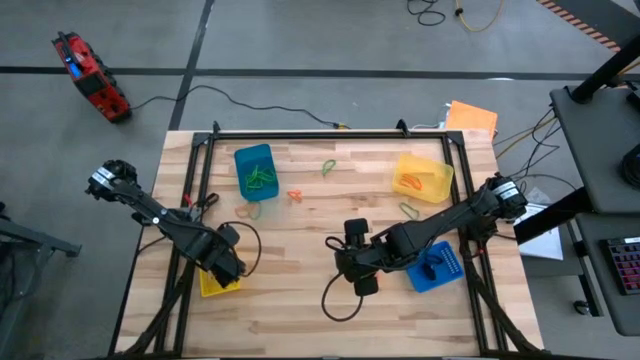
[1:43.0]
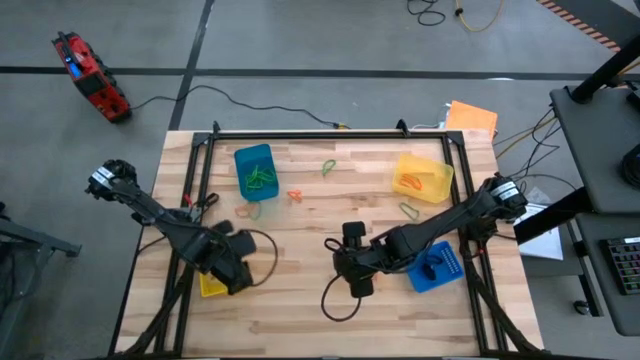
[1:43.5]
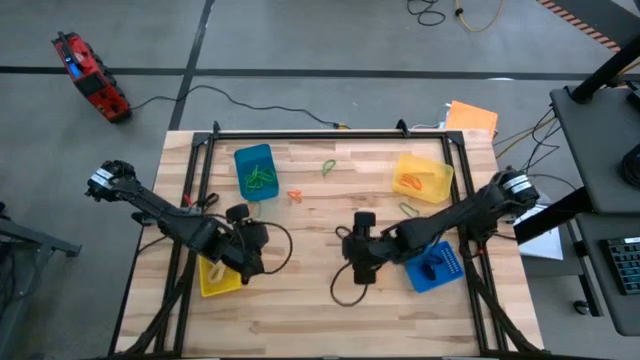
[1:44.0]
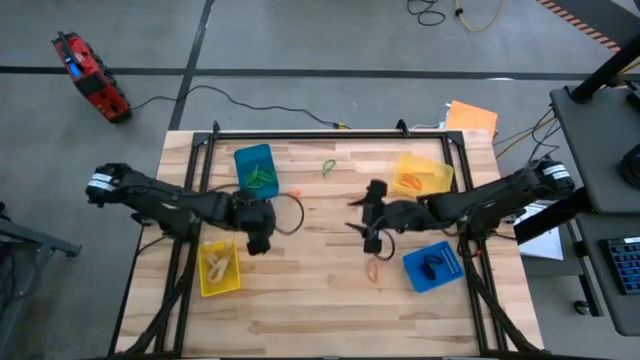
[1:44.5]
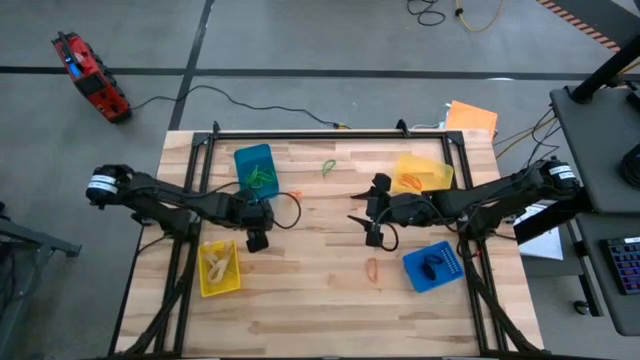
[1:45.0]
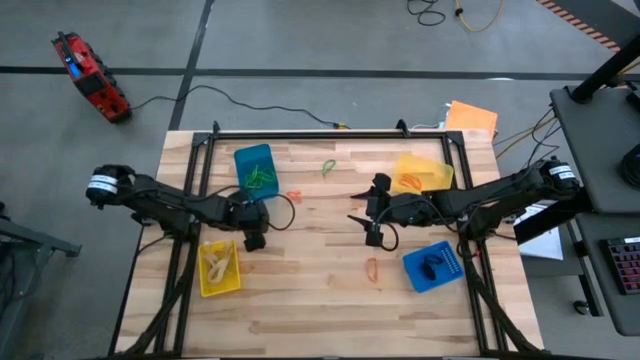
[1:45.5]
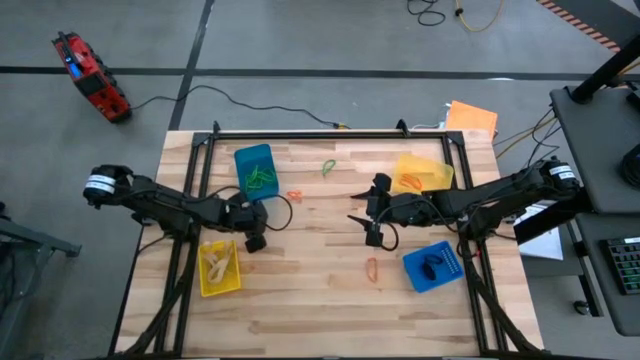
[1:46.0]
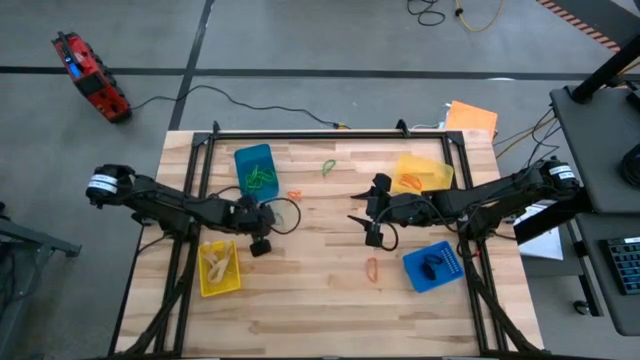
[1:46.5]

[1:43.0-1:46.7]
Task: Sort rubber bands into baskets
Put the green rubber band into the light blue bin

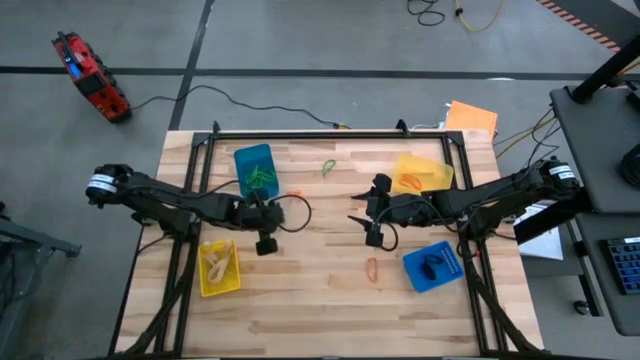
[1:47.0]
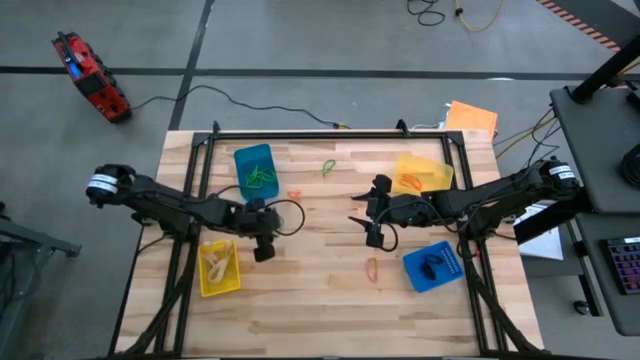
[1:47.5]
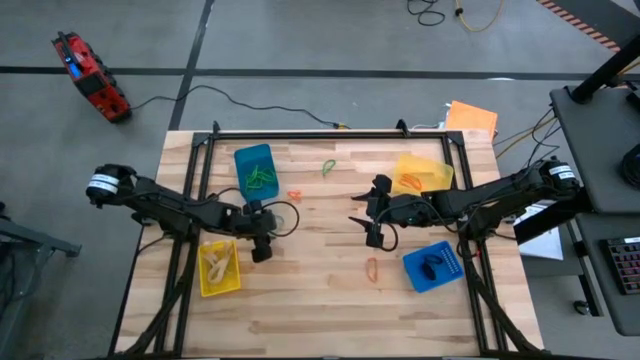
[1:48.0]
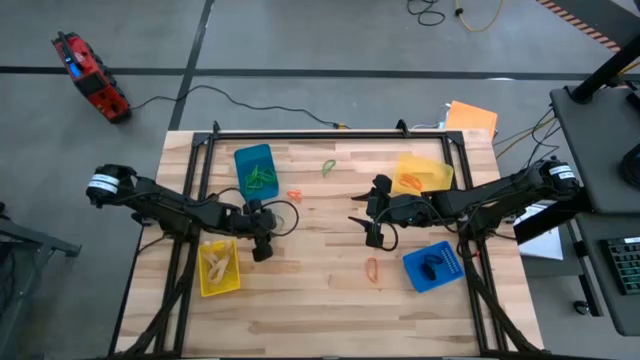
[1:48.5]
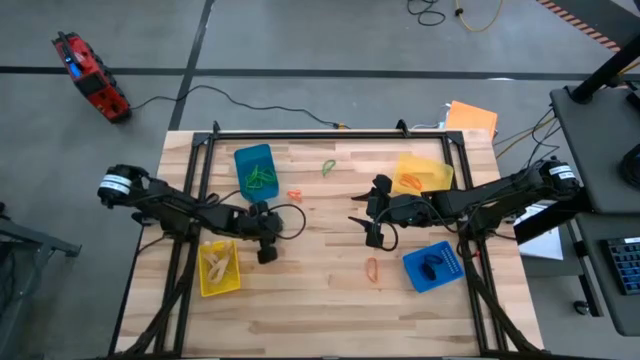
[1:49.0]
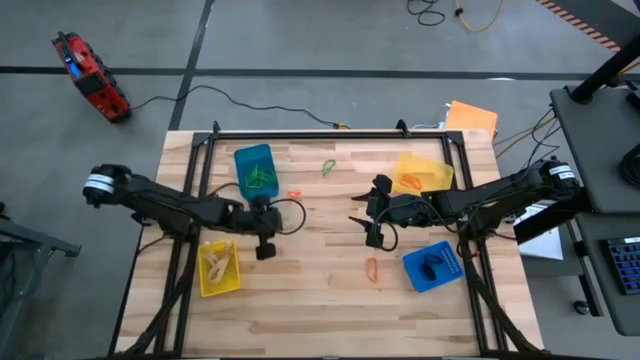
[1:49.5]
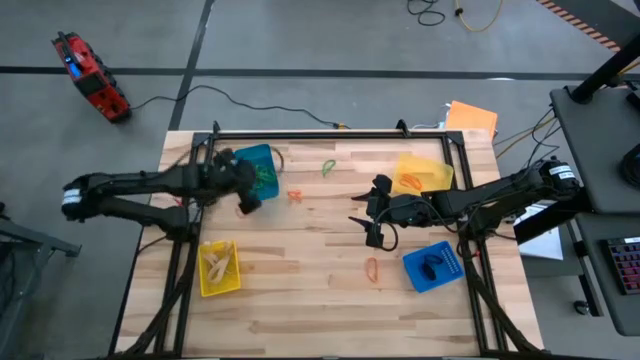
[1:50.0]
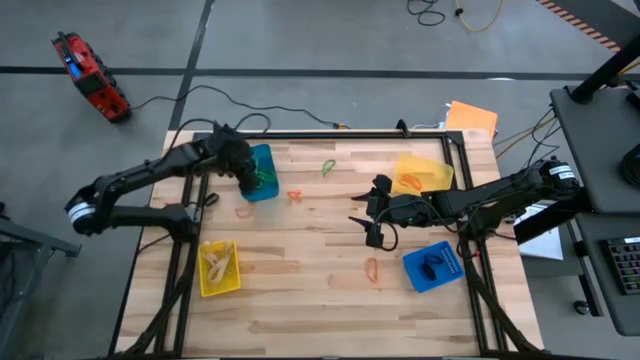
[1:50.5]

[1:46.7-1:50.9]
Put the green rubber band into the light blue bin

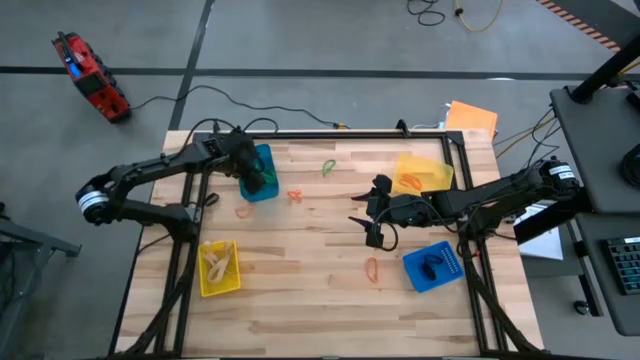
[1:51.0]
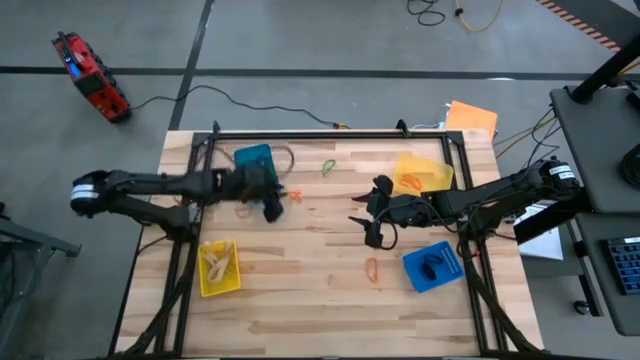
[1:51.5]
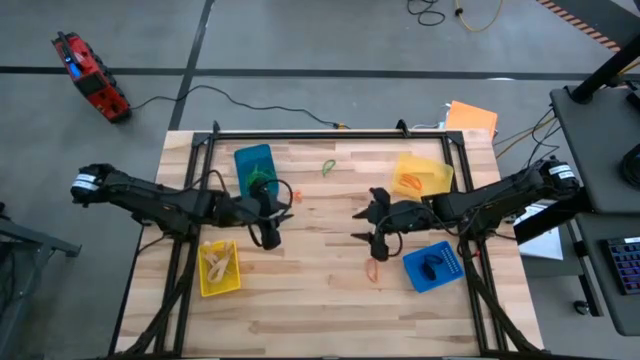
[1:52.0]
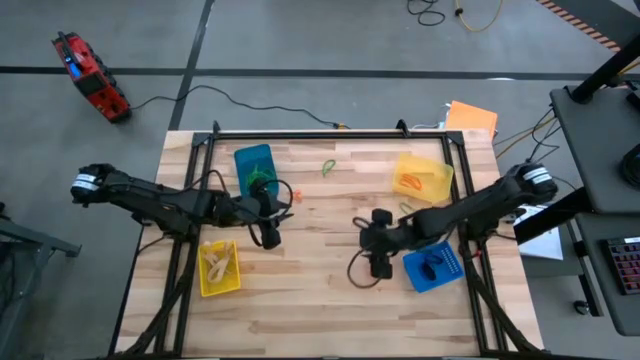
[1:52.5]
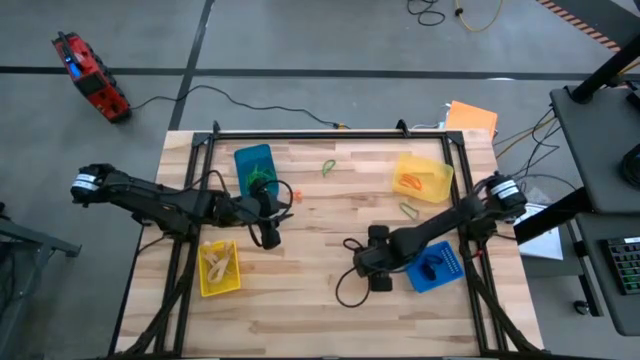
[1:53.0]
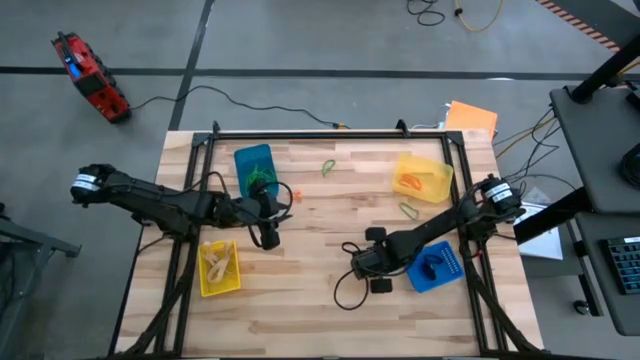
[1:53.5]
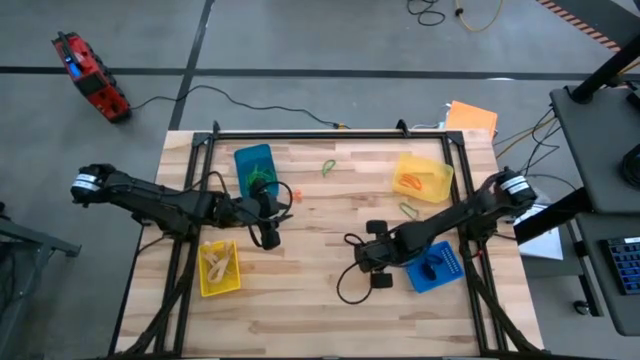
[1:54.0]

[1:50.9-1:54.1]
Put the orange rubber band into the light yellow bin

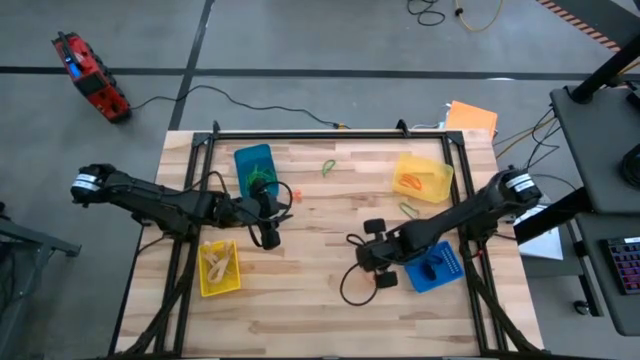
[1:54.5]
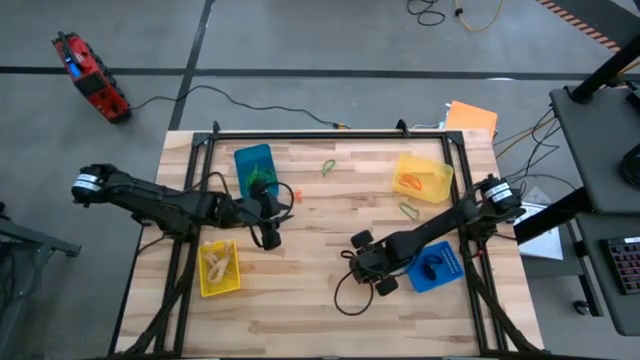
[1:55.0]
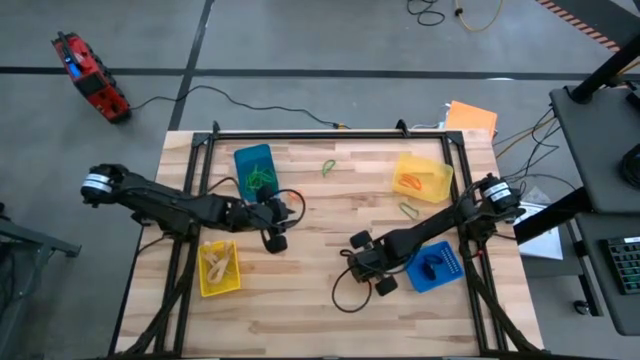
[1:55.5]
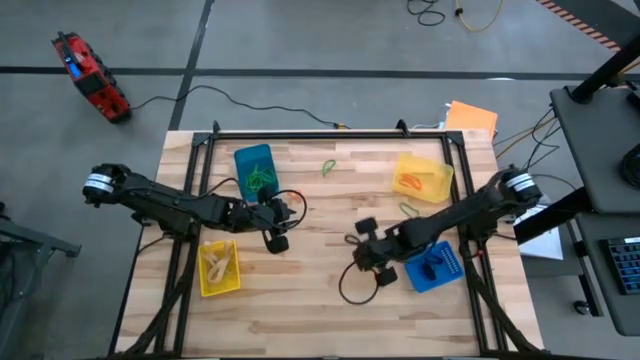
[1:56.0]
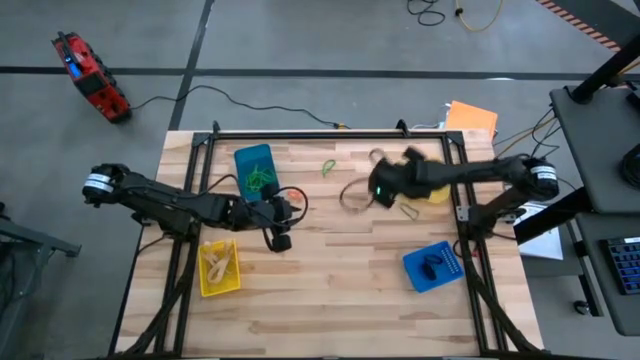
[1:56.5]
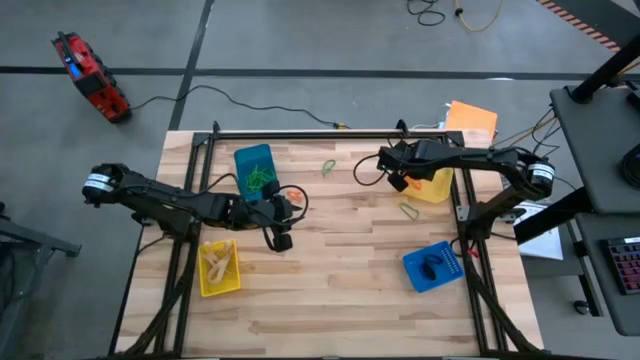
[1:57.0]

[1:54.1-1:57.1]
Put the orange rubber band into the light yellow bin

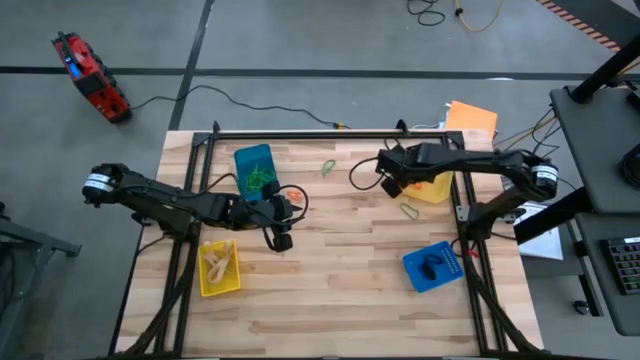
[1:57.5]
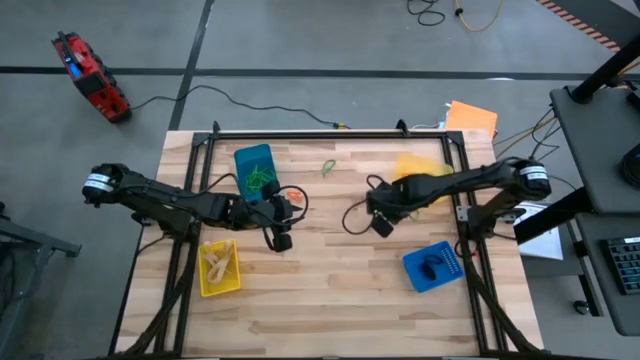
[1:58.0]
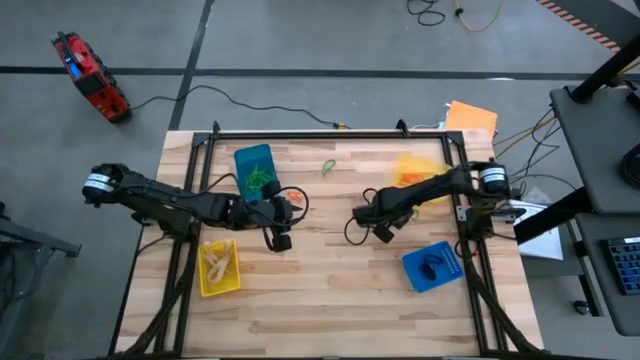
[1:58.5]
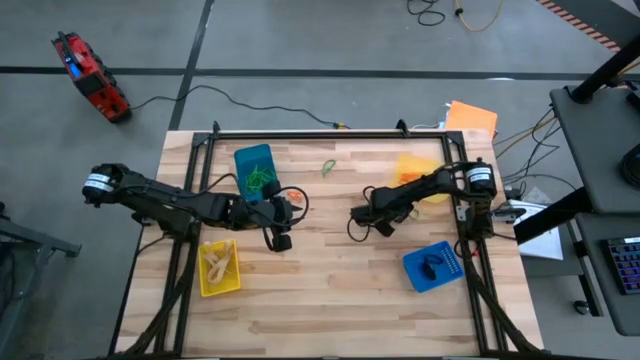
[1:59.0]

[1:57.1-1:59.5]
Put the green rubber band into the light blue bin

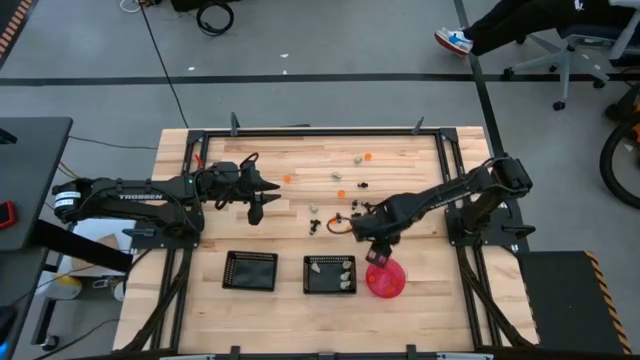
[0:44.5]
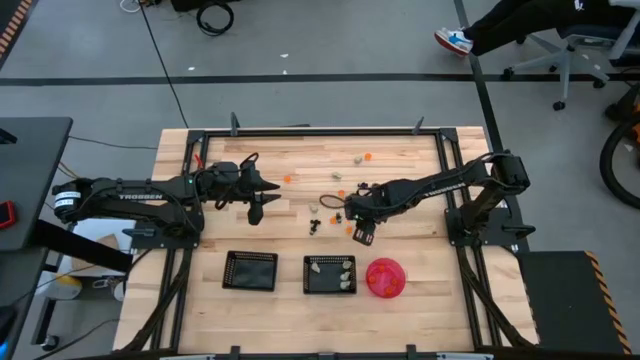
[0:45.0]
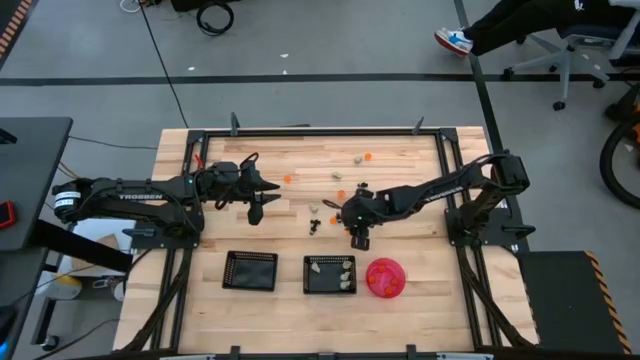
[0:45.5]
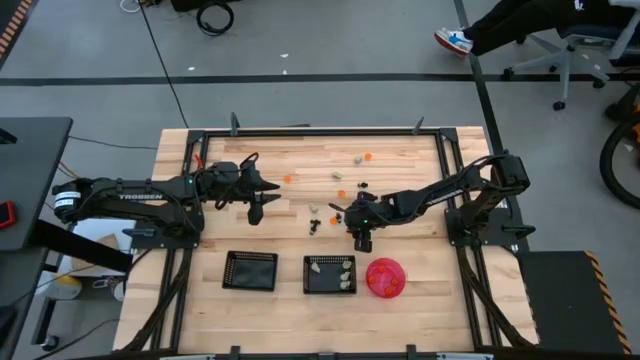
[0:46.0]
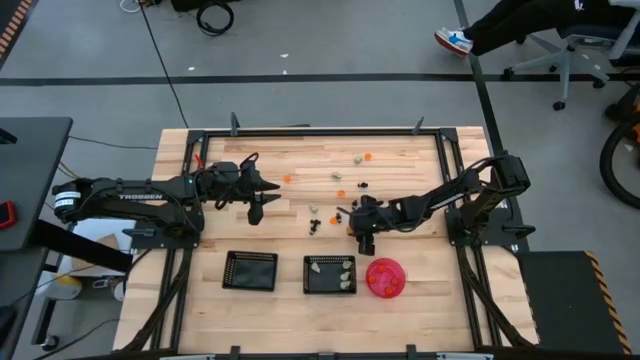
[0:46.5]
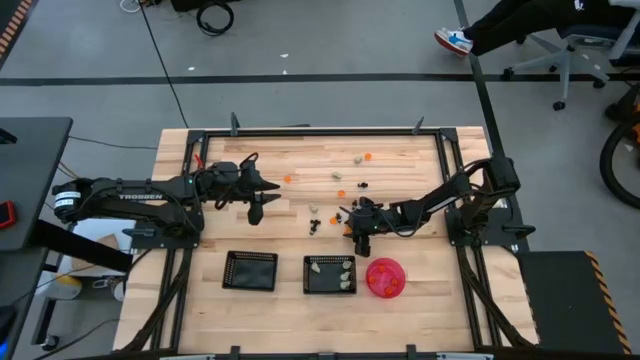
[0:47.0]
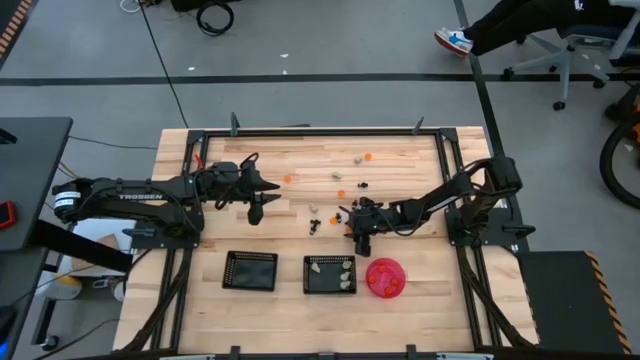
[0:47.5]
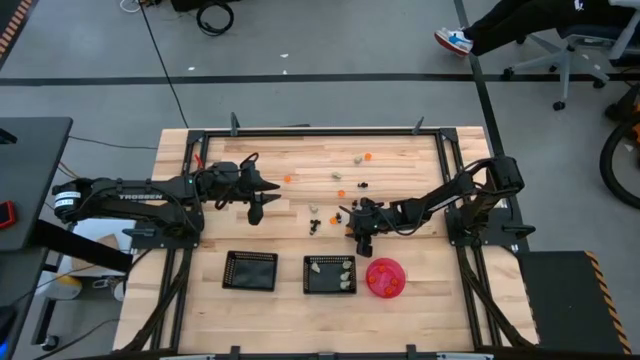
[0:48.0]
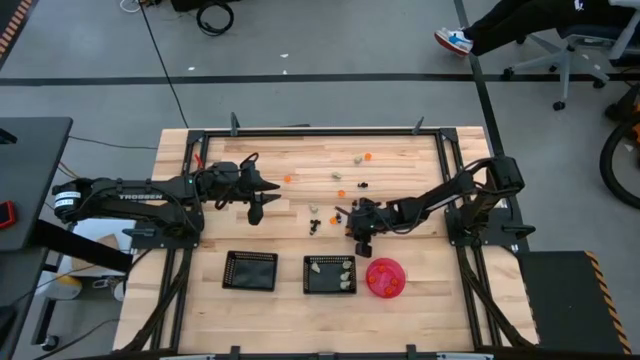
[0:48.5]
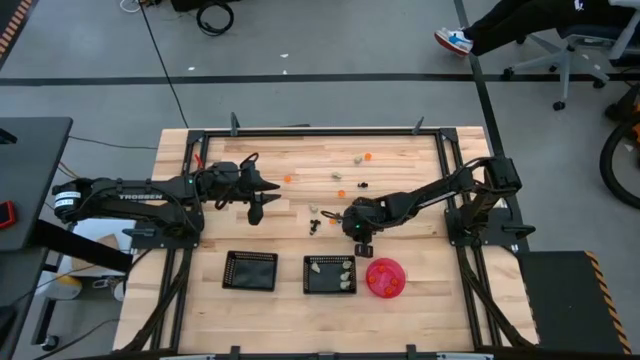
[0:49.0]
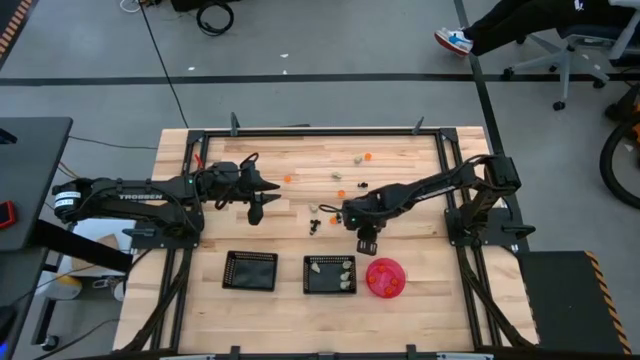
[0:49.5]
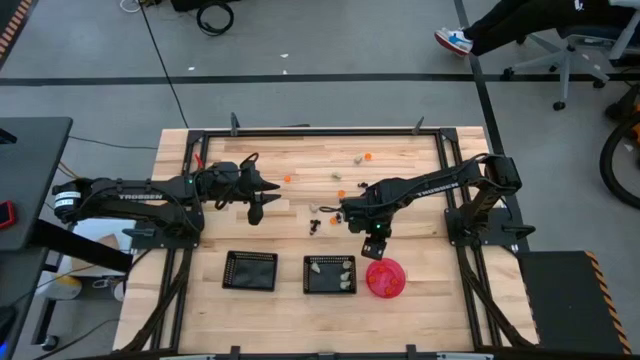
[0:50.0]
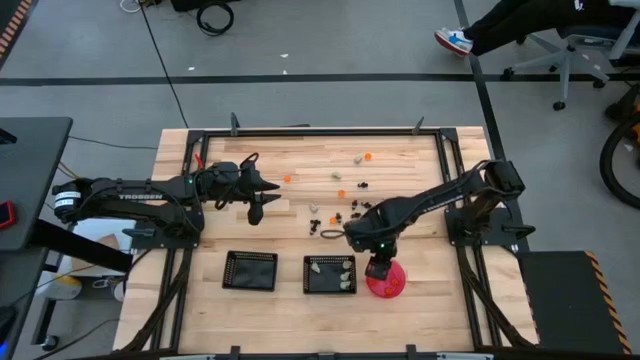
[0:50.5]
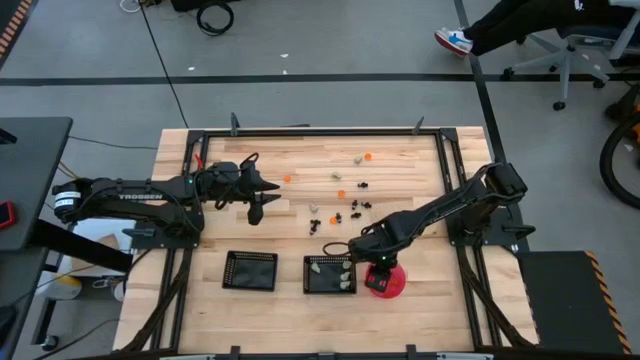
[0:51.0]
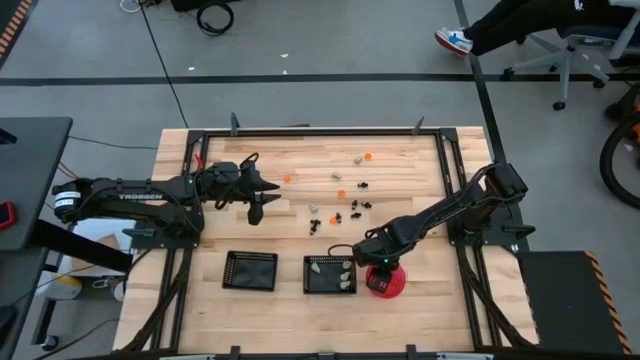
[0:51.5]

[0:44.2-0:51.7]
Task: Sort Halloween decoration
Put the orange pumpkin toy into the pink bowl
